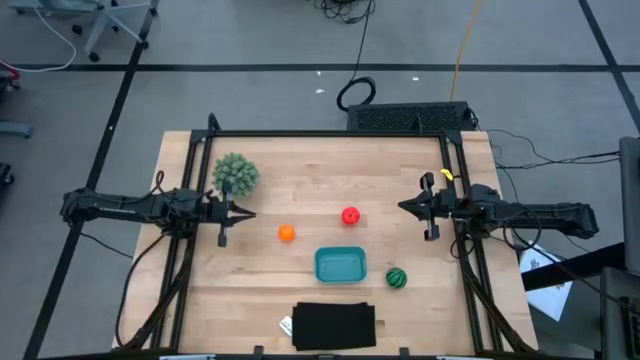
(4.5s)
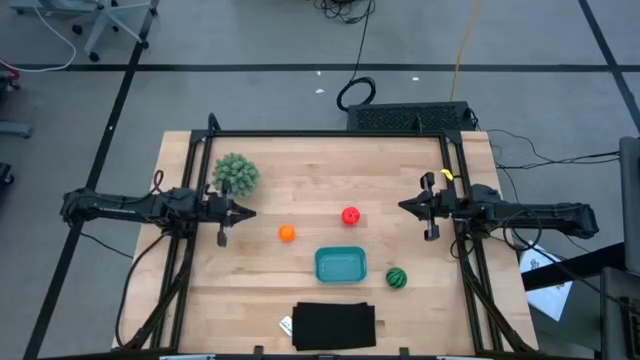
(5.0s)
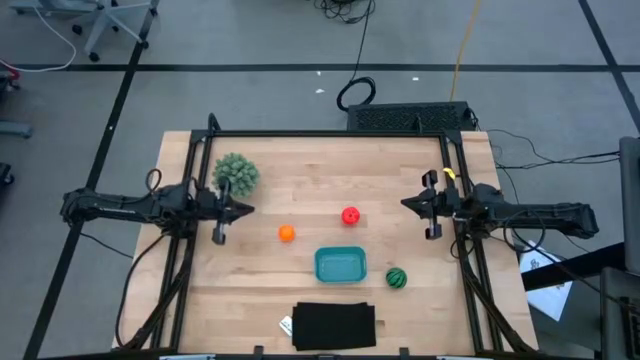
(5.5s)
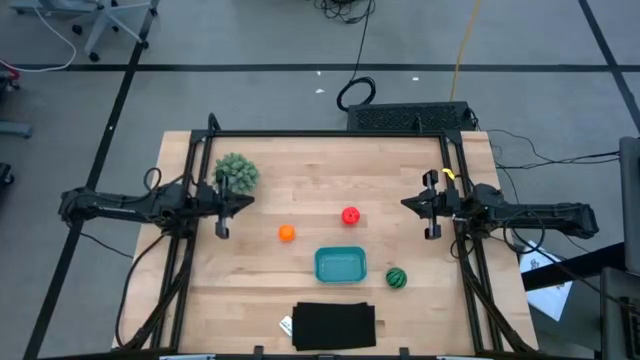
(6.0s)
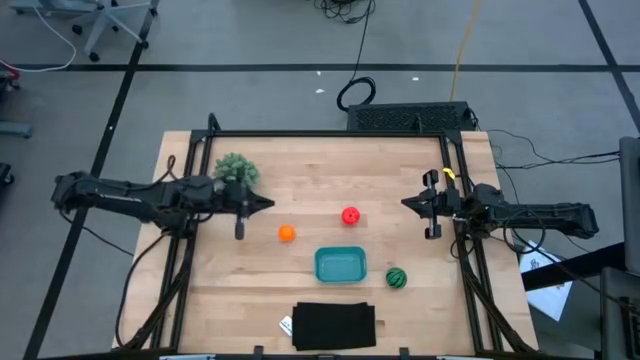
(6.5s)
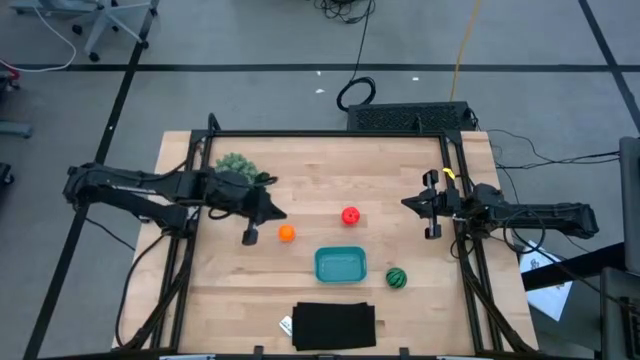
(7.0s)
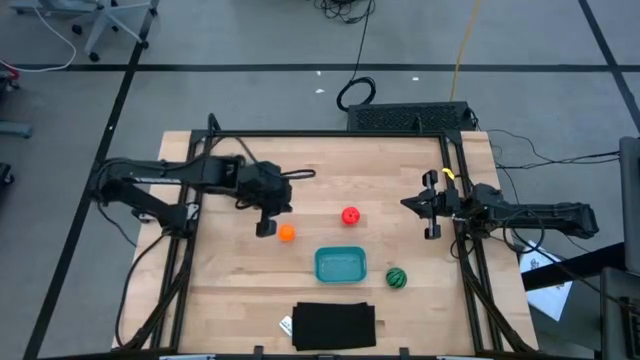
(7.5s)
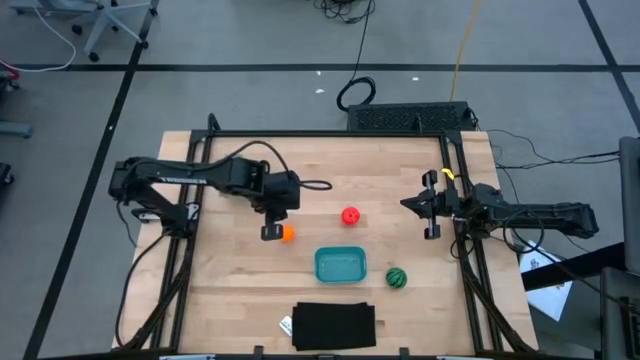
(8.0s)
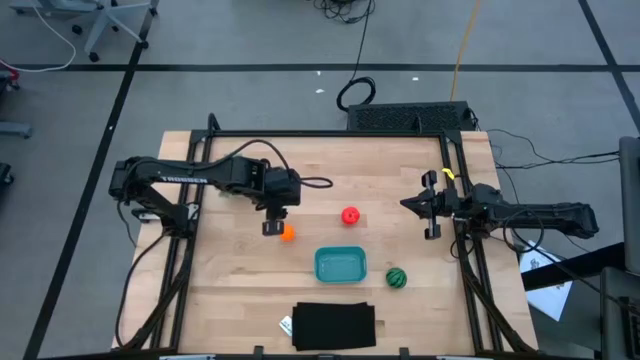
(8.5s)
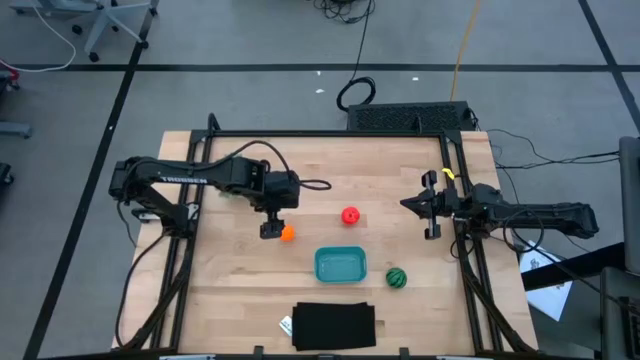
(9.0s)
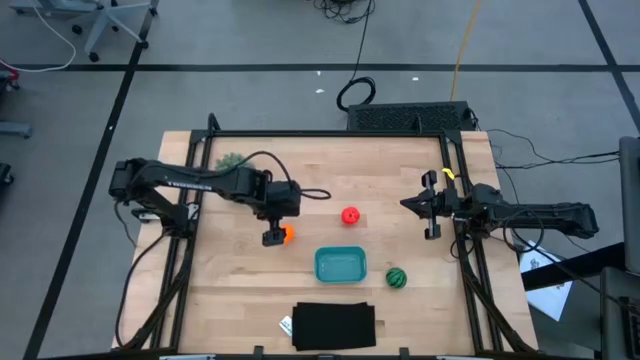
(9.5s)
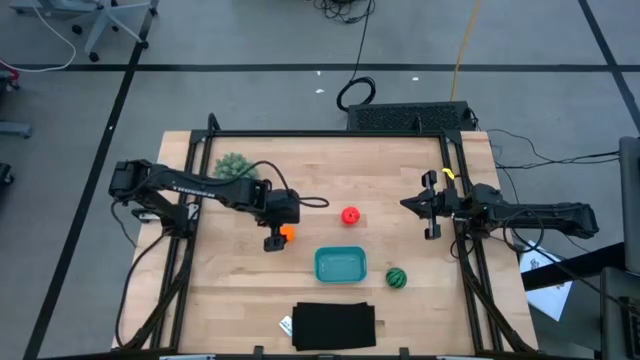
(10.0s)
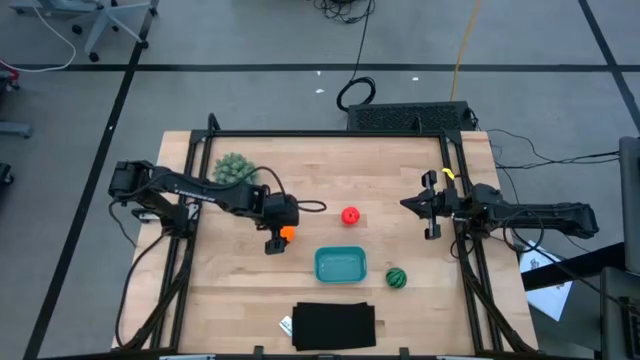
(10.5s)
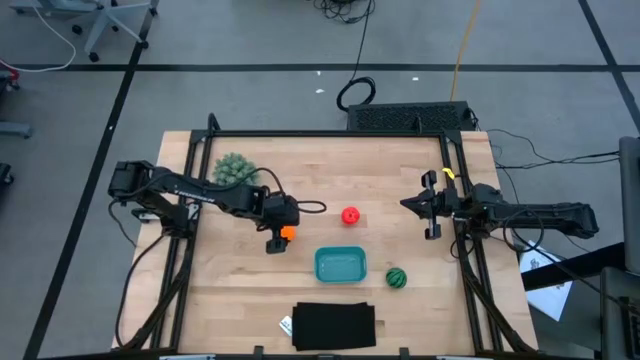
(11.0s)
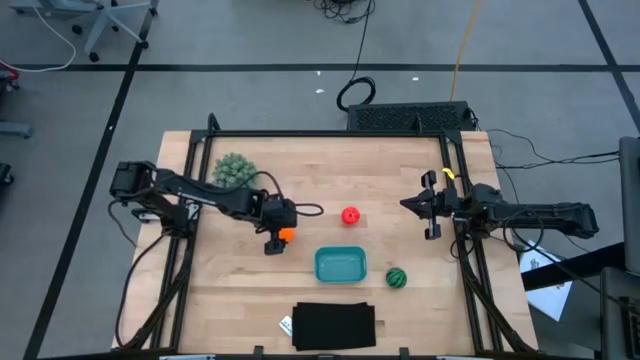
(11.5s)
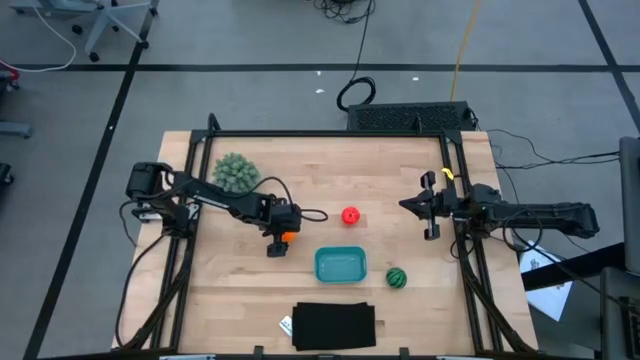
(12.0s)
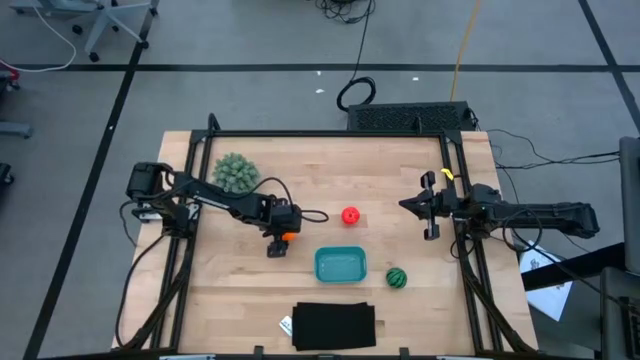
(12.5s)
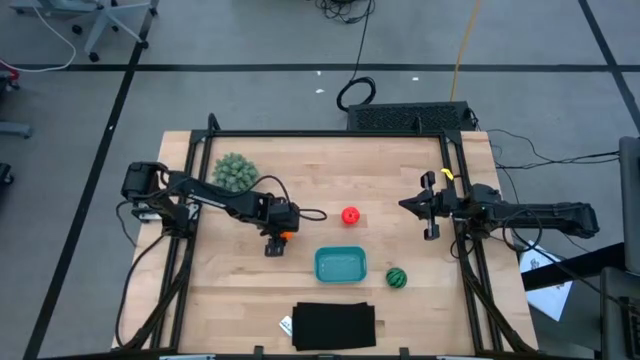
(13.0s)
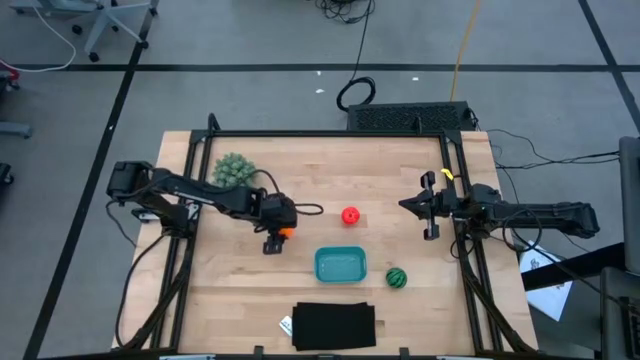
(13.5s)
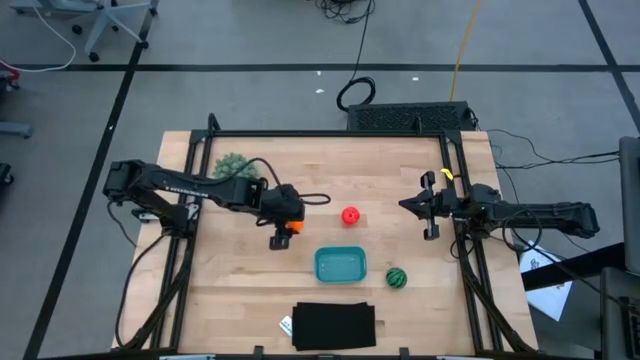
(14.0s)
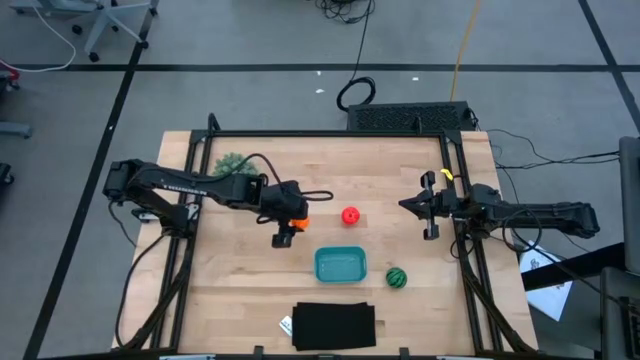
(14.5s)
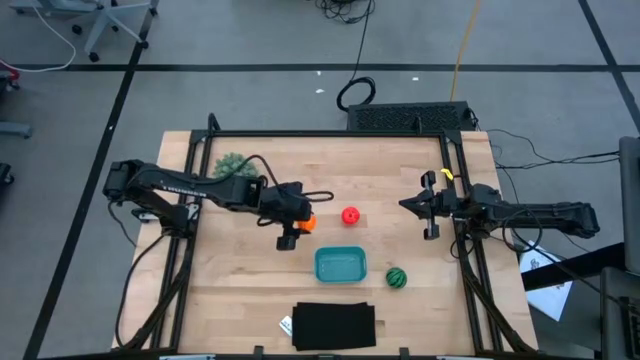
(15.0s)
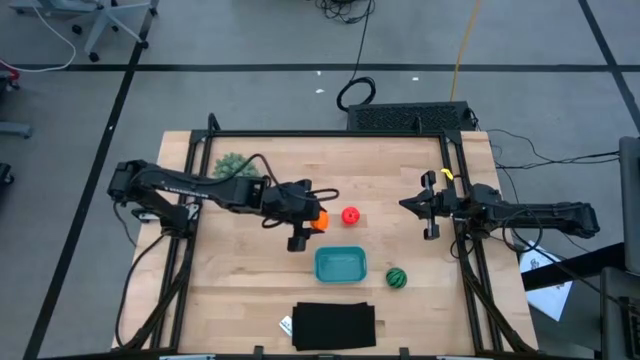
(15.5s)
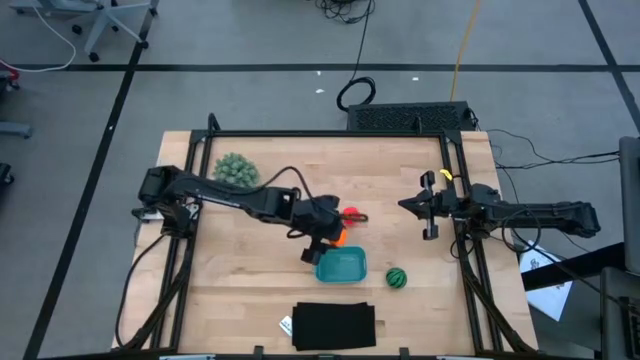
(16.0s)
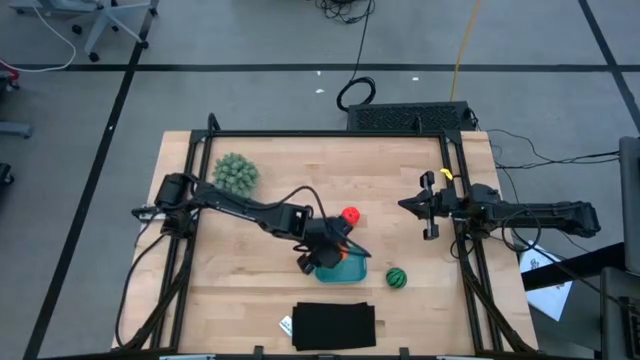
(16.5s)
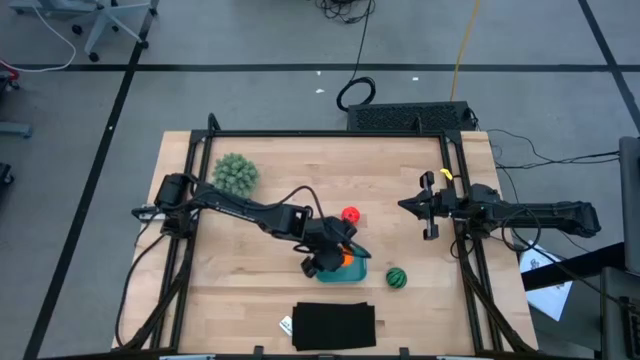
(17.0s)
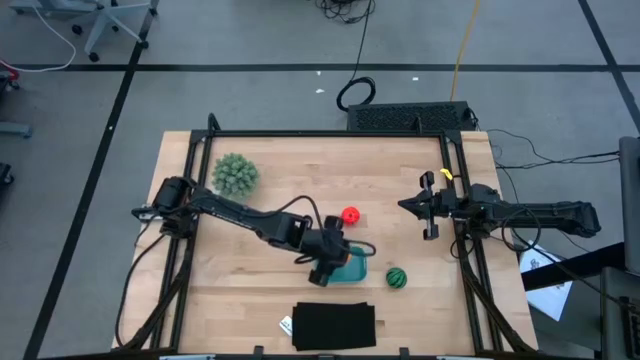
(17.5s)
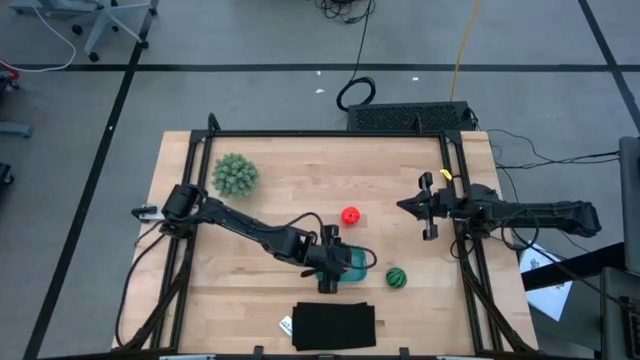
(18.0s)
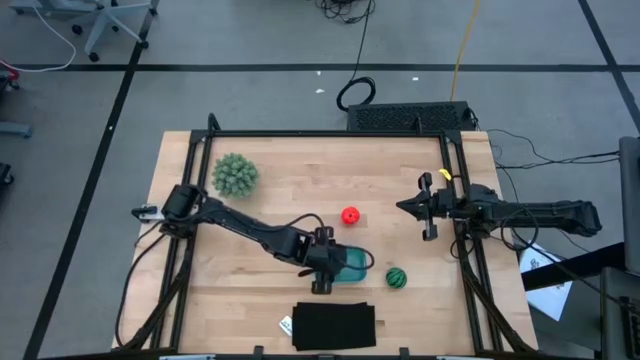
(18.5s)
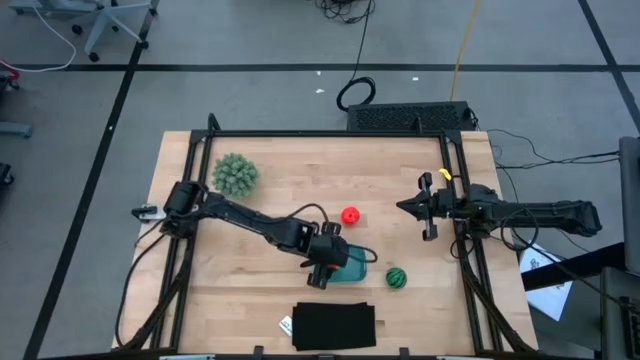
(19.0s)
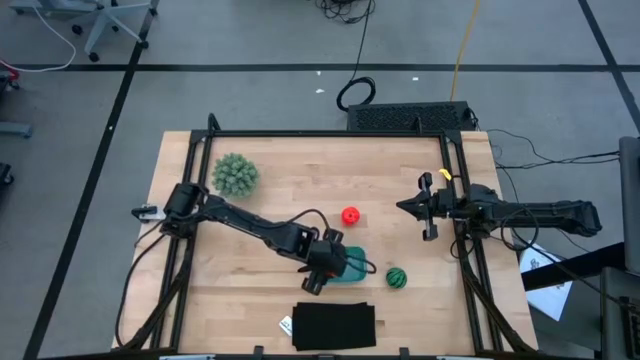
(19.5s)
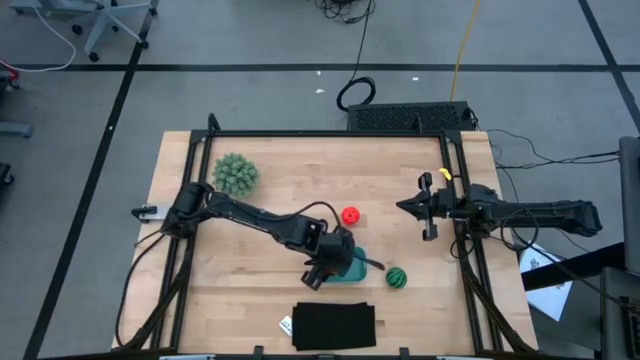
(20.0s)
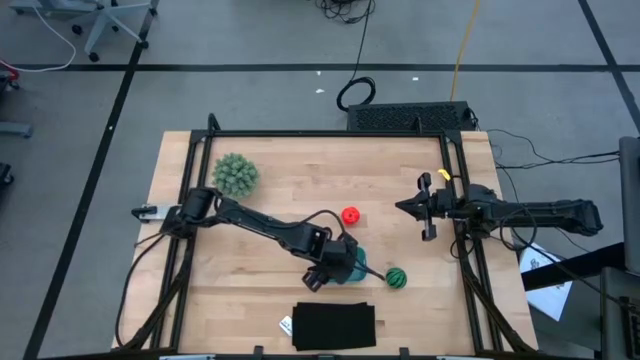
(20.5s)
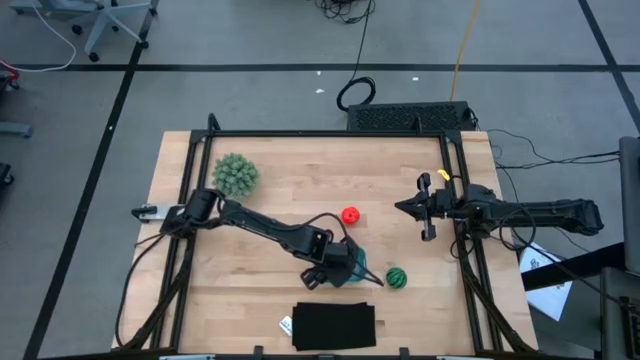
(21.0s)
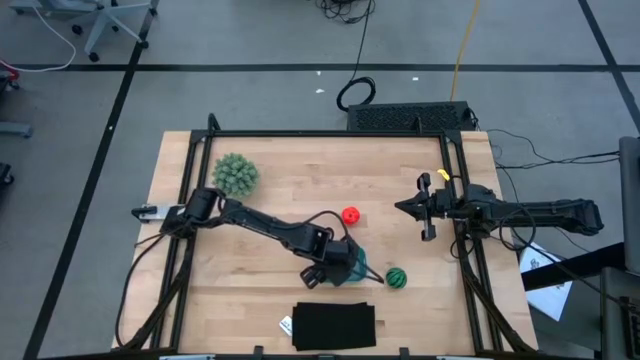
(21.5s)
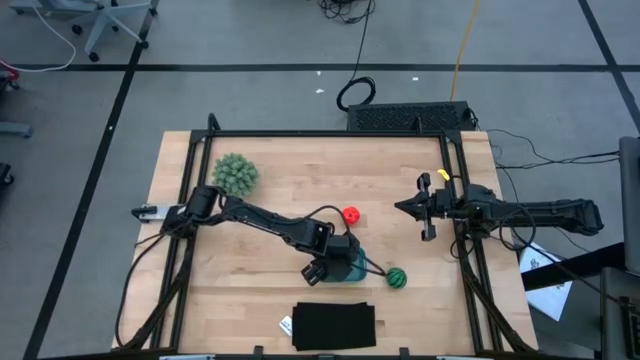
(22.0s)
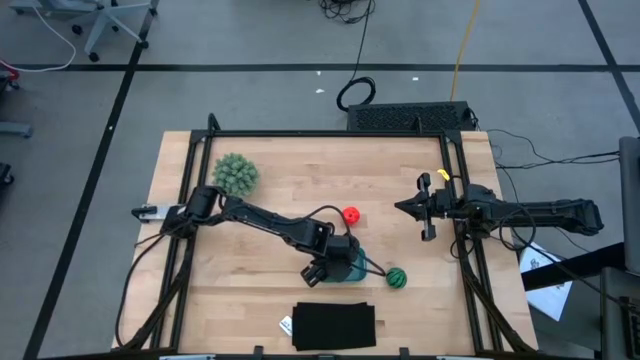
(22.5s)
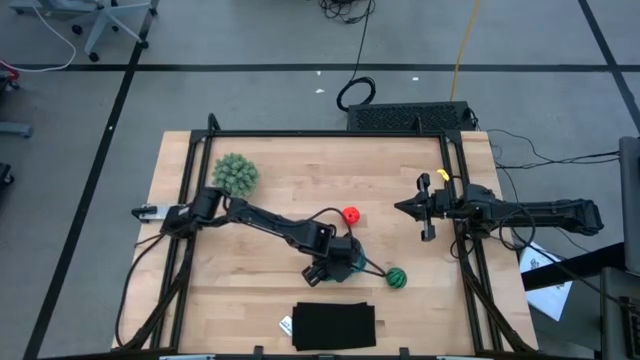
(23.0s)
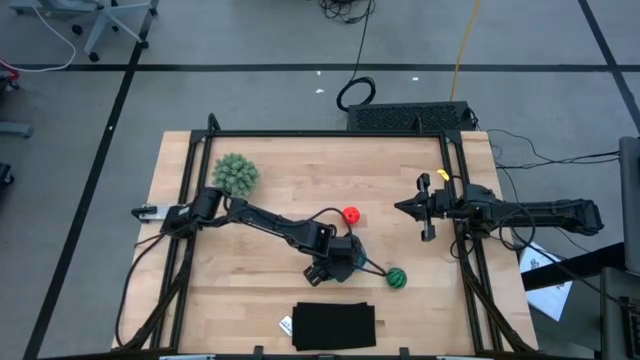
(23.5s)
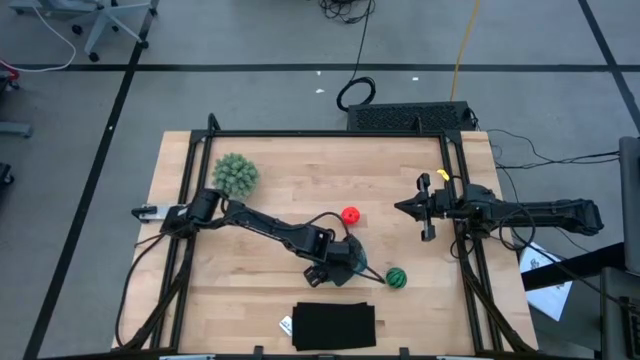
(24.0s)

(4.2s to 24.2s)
Task: Pick and placing Produce into tupperware
Put the tangerine in the blue bin

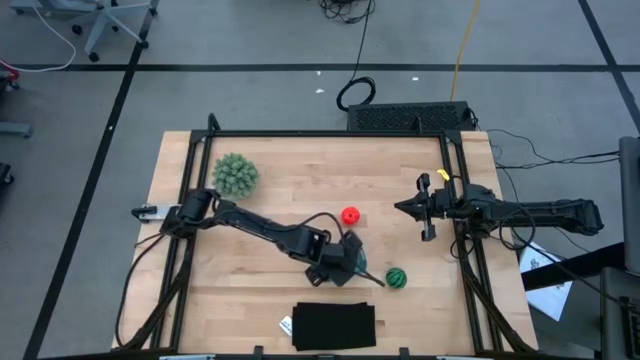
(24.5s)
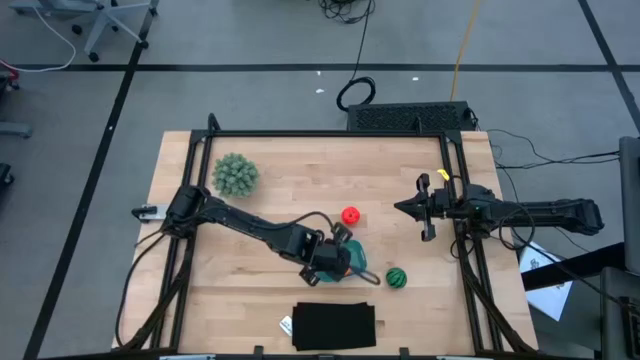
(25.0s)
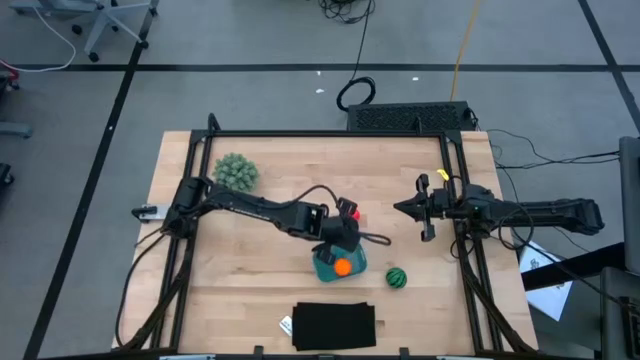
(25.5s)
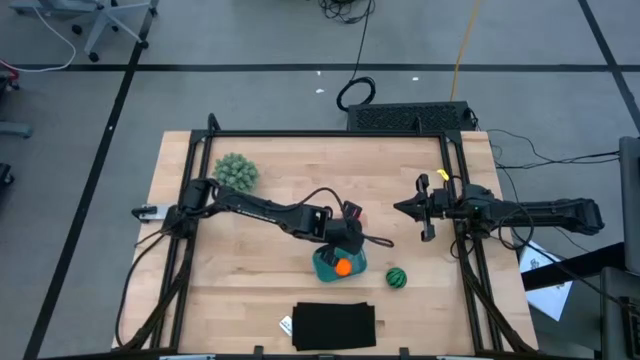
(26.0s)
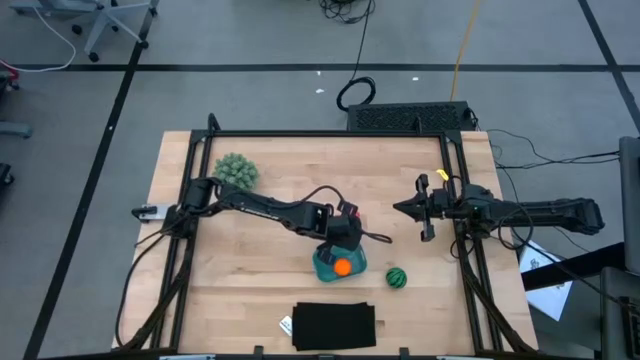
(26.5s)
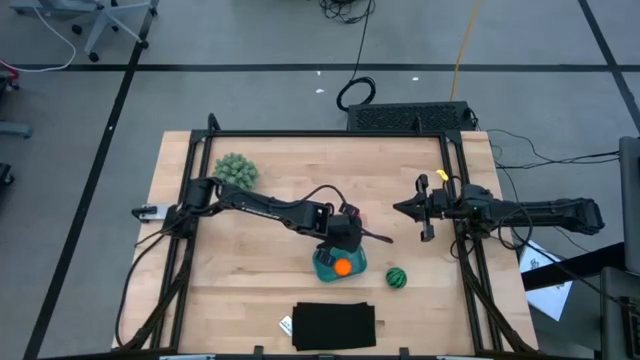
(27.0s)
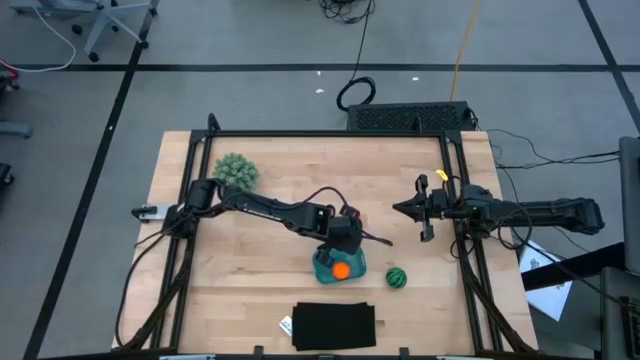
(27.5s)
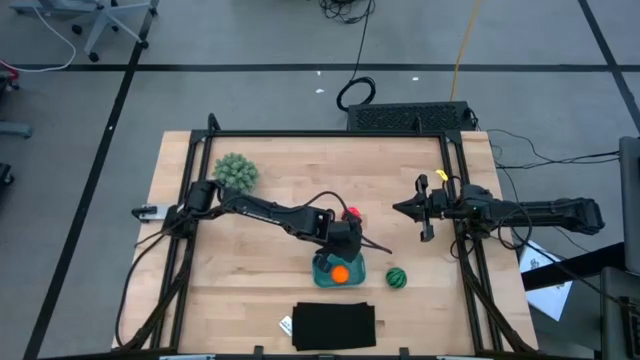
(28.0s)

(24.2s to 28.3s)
Adjust the blue bin
